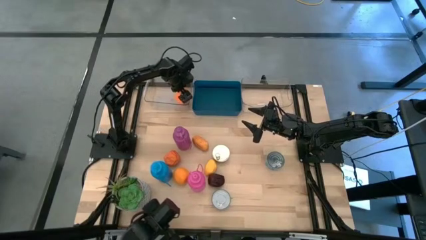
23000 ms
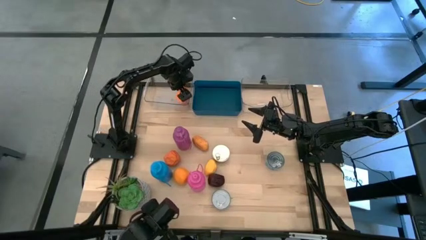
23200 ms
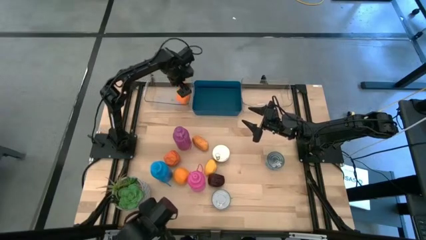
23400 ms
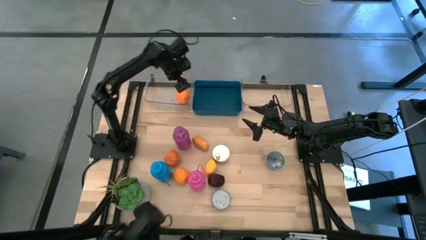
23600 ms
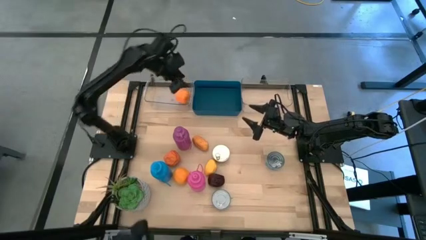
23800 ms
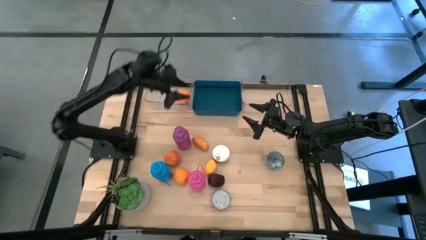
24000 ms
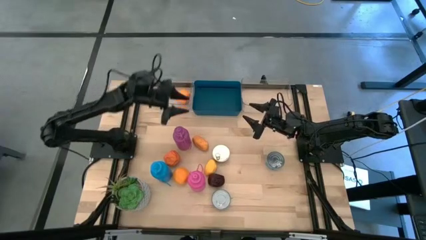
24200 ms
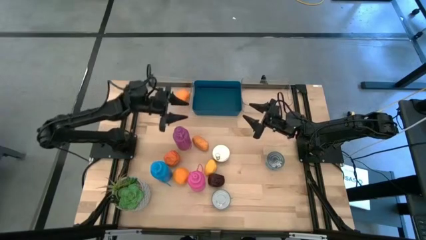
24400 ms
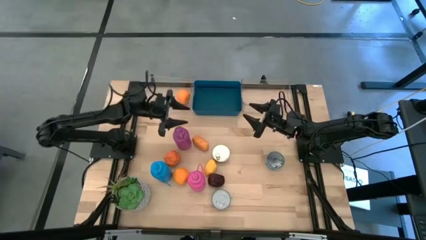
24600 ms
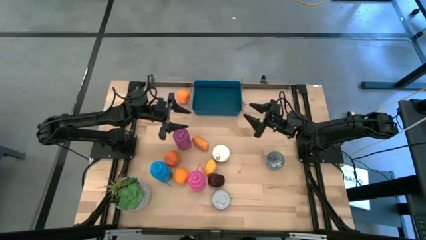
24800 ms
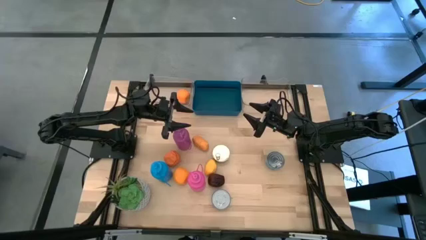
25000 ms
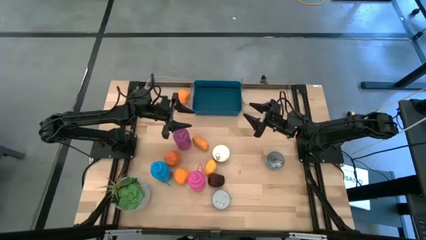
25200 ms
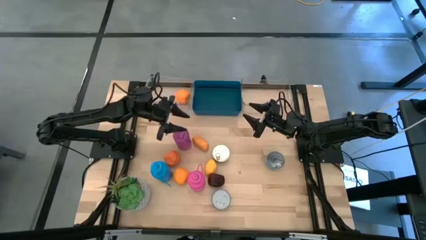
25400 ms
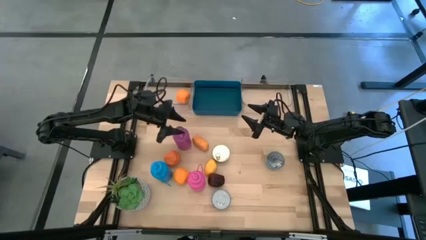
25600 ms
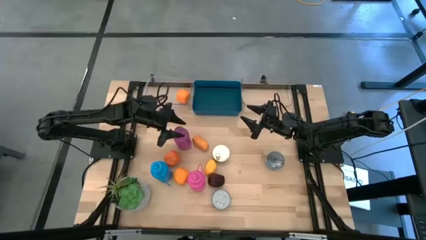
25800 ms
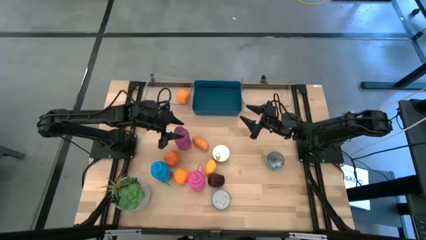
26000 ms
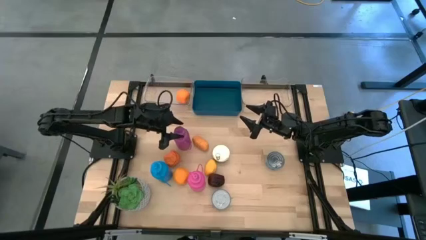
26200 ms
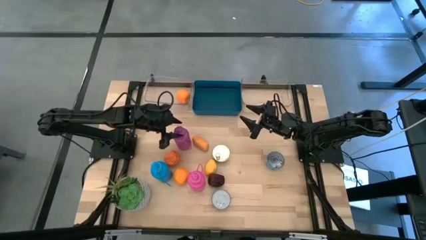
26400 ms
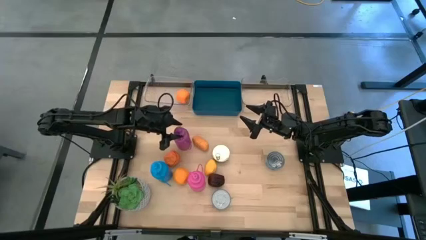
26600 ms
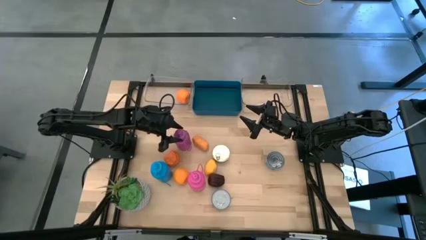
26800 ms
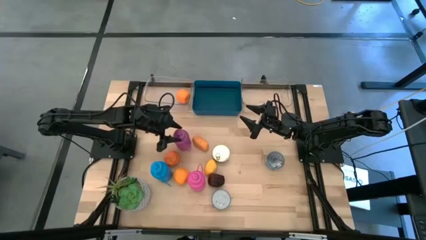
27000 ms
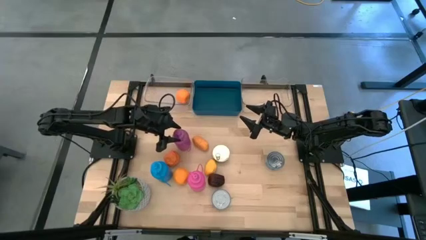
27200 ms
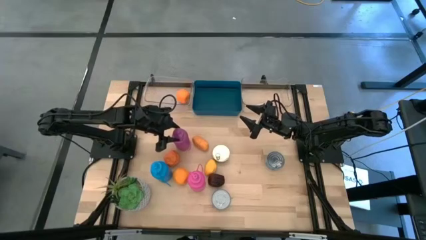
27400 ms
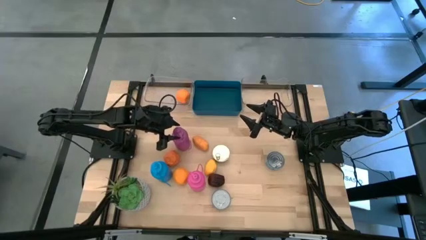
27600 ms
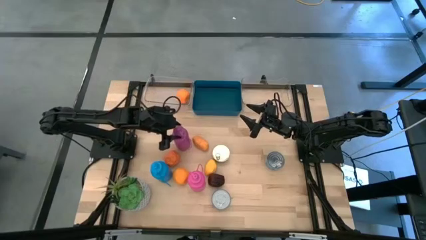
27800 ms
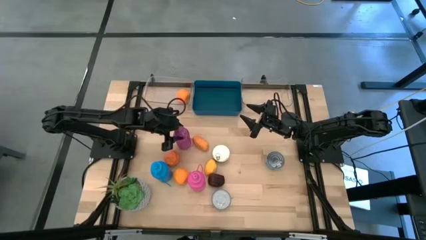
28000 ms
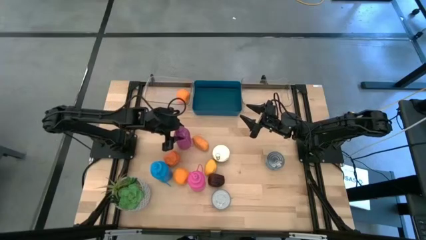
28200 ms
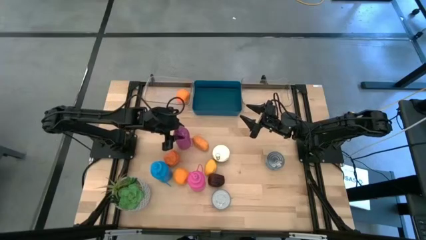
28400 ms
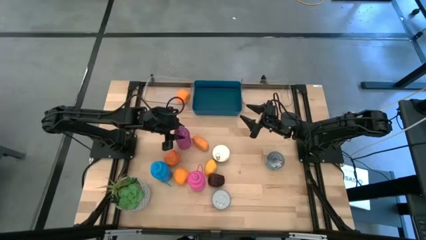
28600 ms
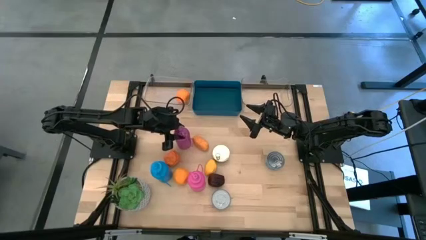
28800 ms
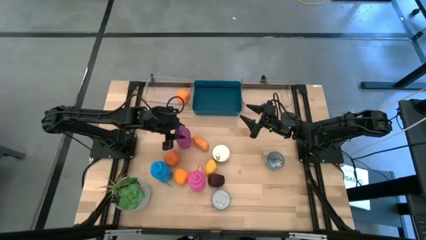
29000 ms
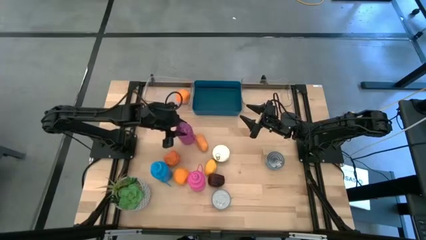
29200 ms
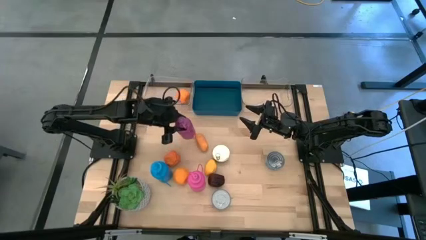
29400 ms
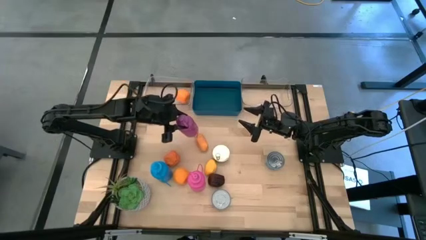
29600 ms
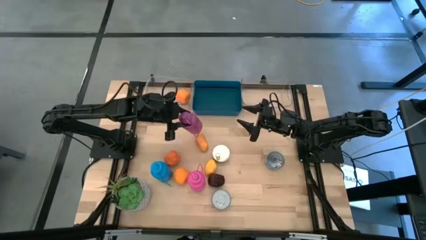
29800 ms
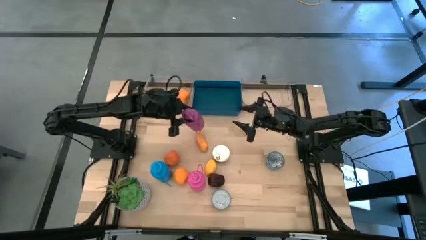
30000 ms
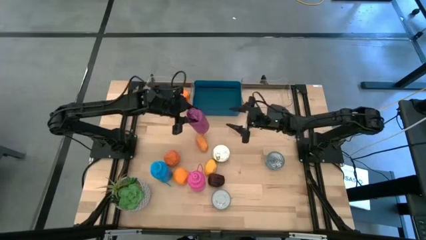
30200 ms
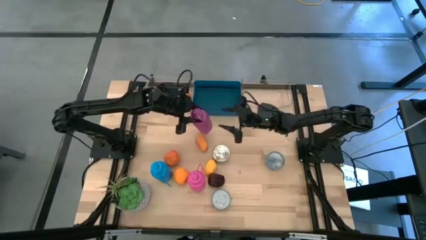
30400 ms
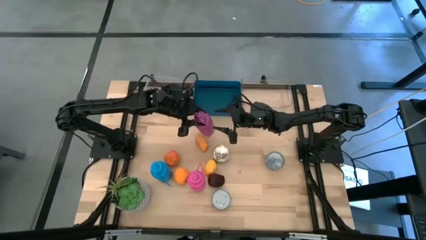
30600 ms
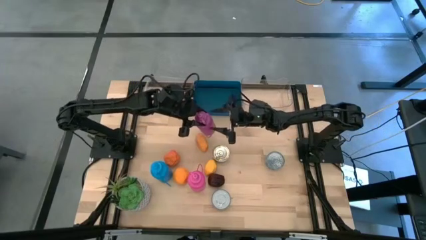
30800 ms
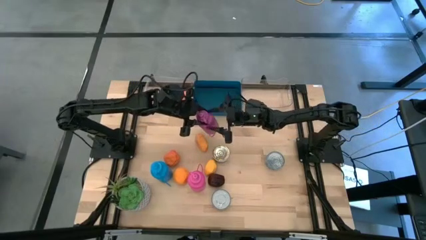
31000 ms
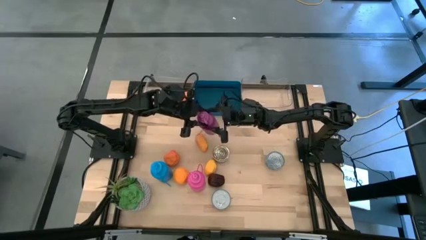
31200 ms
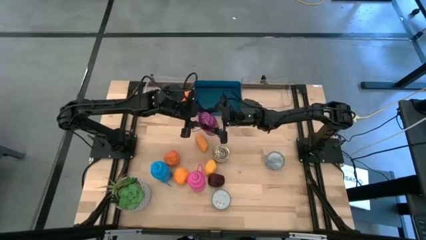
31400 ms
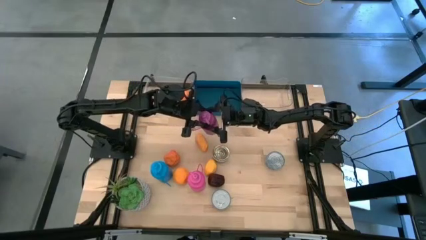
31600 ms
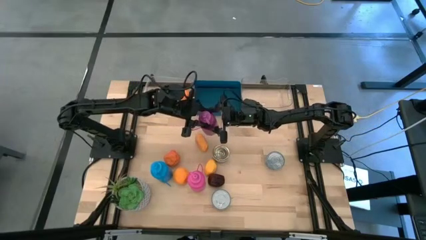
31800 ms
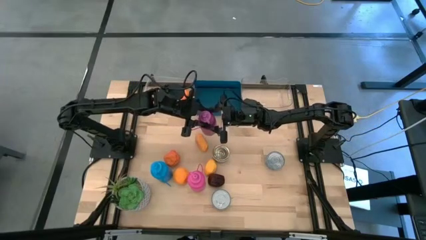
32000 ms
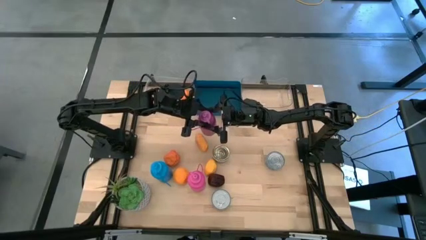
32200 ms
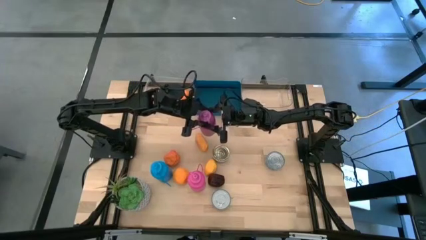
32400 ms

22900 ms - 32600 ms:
Task: Pick & Place Food Item
Put the violet water bottle into the blue bin

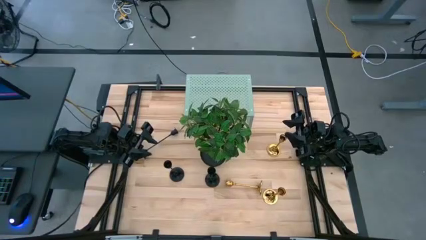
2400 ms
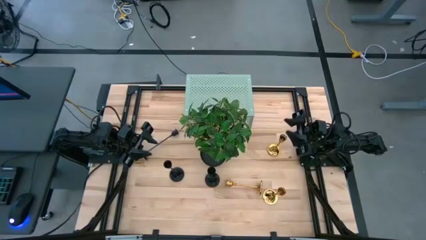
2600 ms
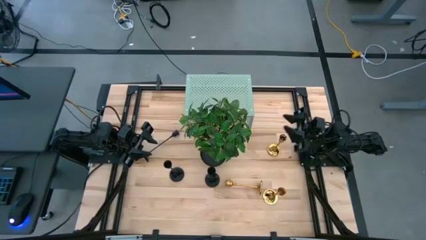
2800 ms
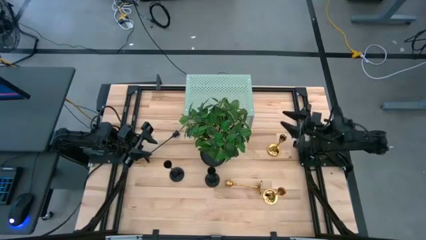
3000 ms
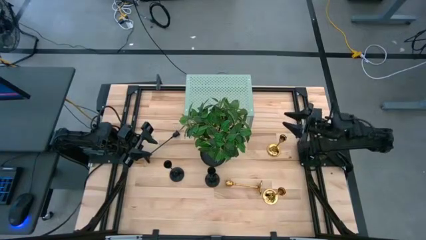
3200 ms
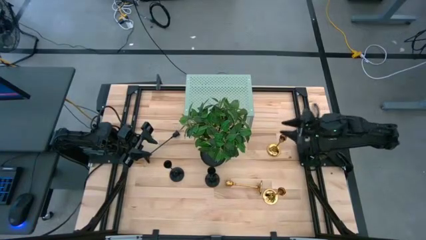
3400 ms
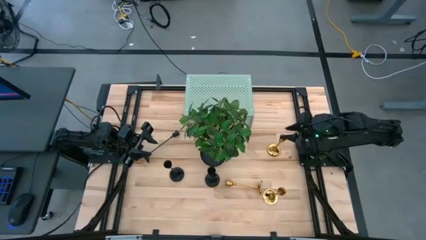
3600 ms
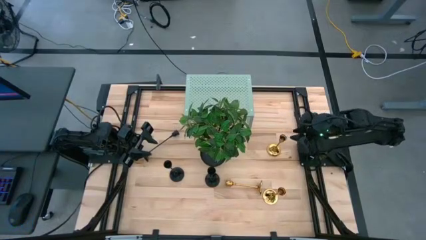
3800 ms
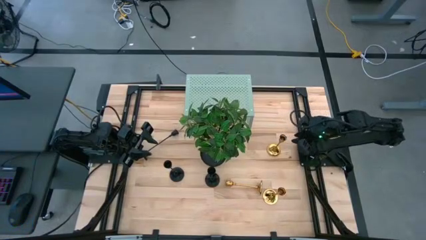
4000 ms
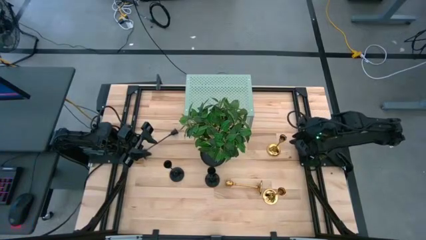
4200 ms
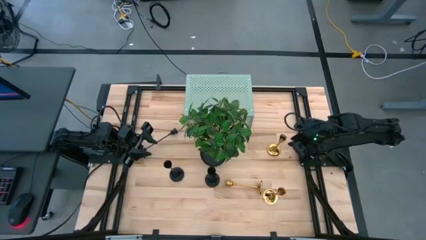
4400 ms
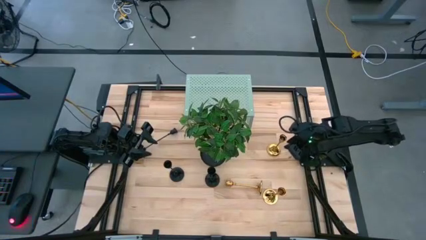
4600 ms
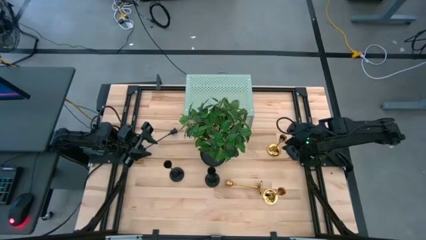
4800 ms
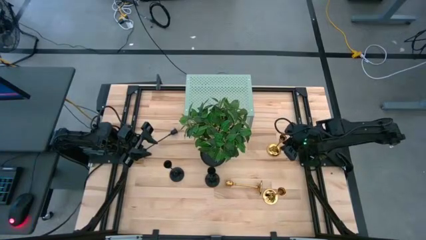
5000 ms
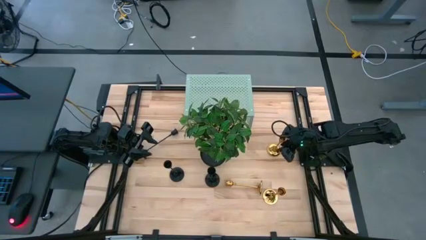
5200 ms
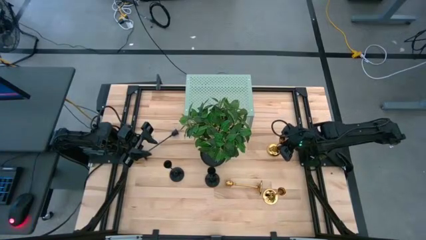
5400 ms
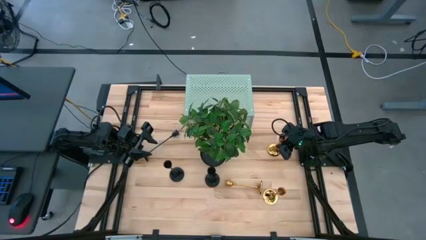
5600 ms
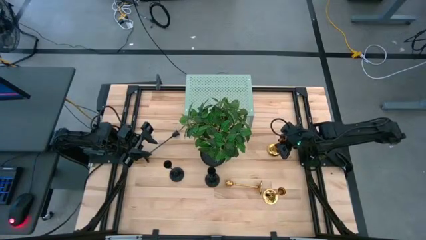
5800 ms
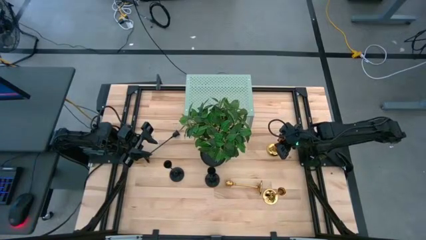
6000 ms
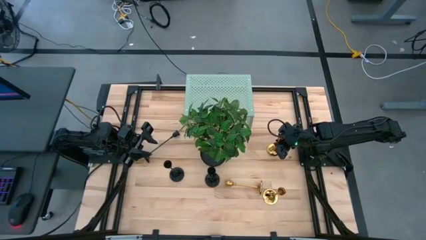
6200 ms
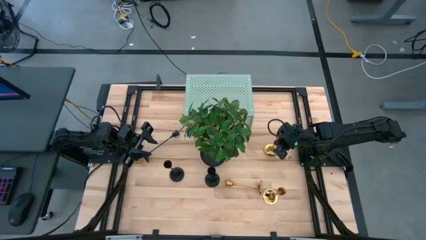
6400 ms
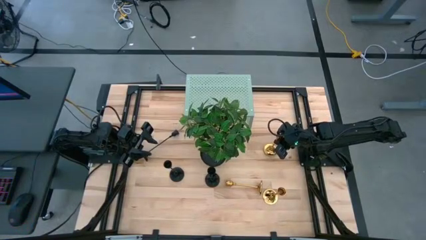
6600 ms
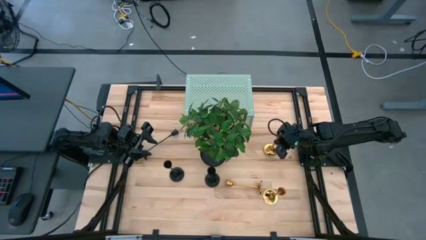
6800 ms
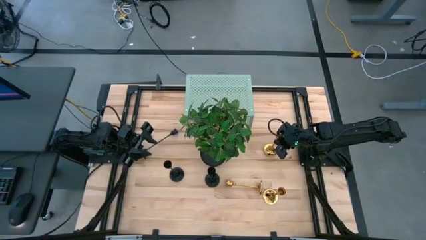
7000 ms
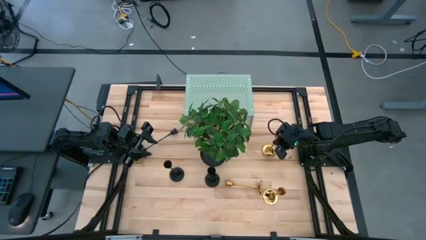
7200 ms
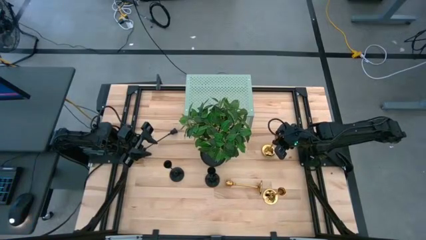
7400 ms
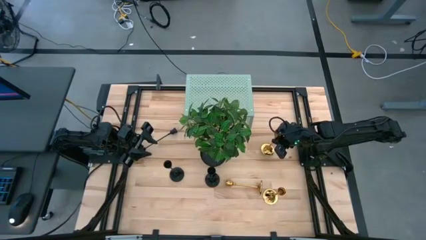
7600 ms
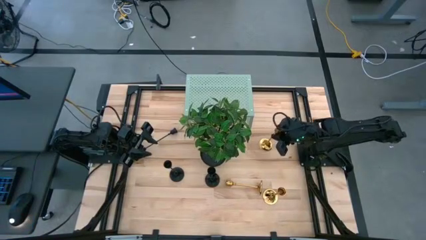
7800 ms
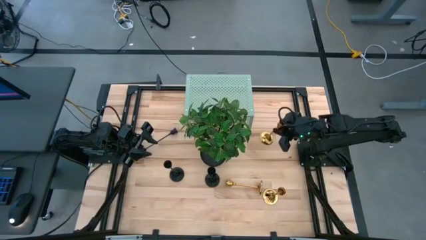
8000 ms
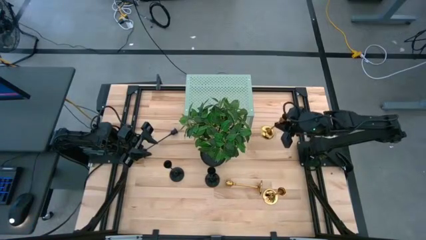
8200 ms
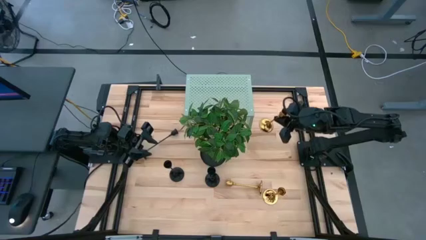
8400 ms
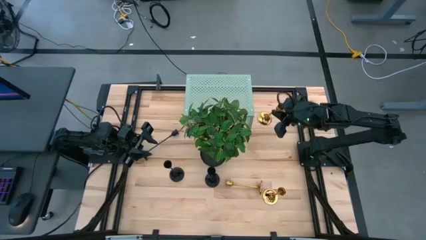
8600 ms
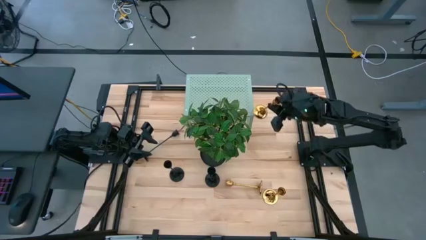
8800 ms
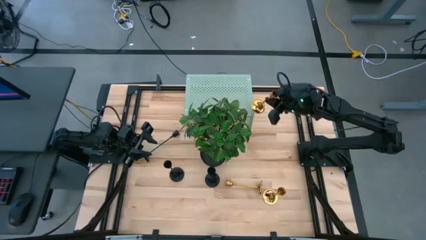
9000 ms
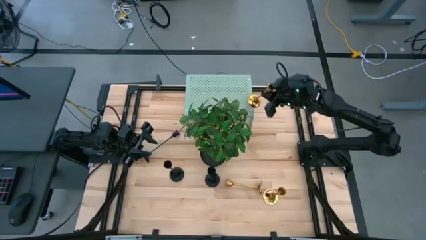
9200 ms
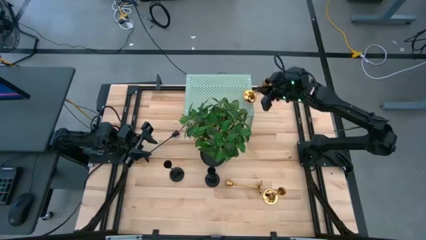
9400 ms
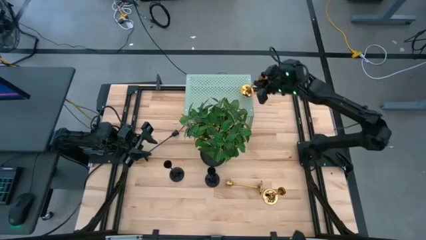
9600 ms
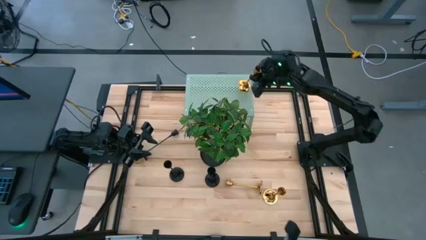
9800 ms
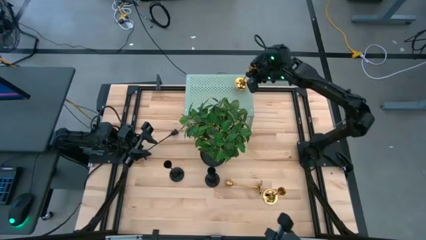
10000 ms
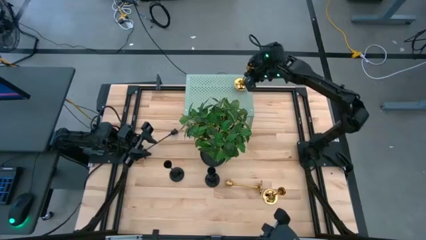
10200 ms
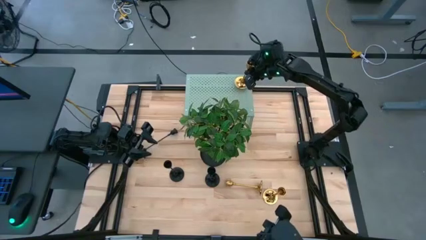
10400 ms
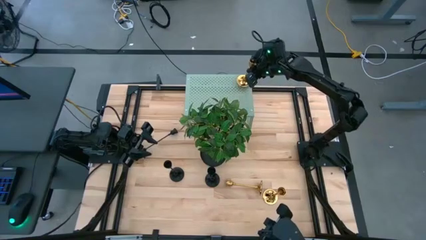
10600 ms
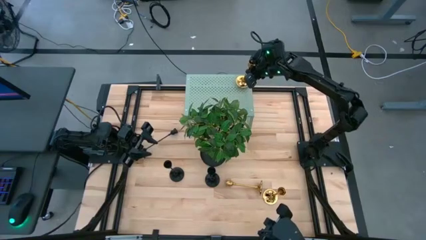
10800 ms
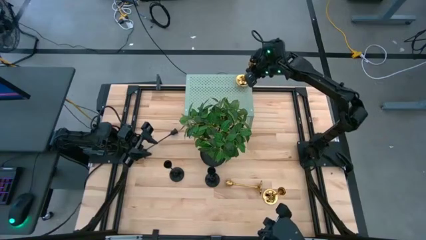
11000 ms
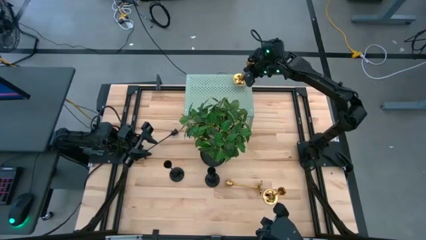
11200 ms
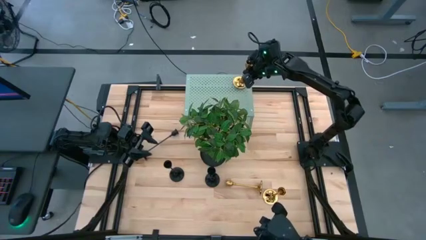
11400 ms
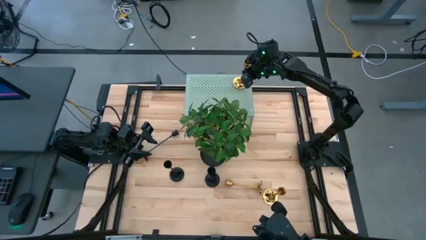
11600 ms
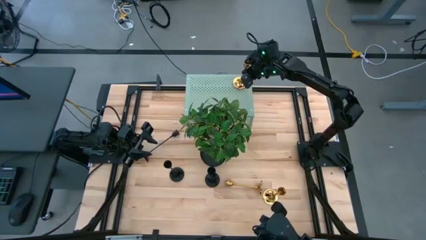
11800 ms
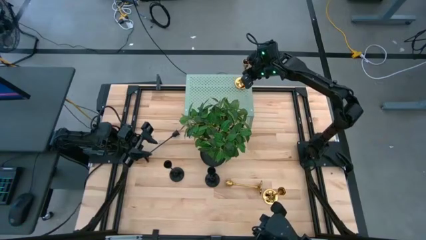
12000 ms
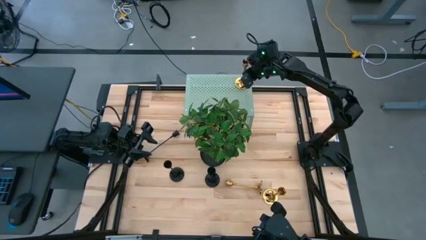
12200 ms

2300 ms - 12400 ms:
Task: Pick & Place candle stick holders
Put the top right gold candle holder on the shelf
